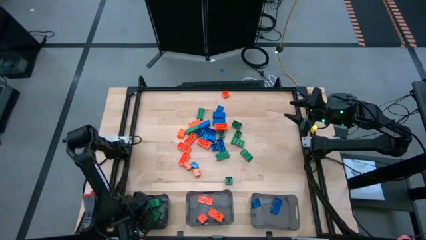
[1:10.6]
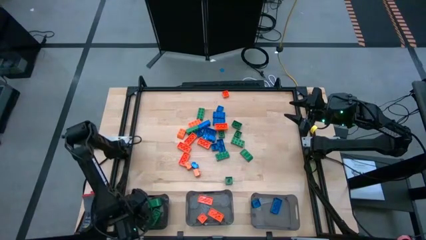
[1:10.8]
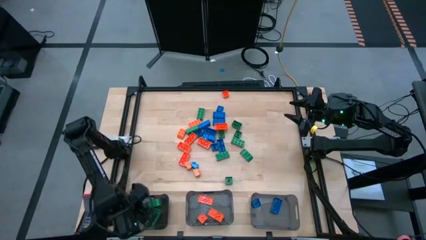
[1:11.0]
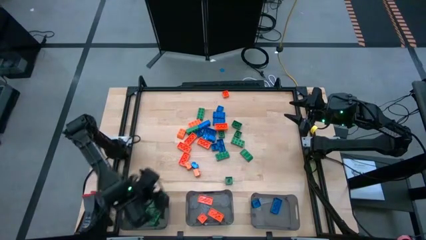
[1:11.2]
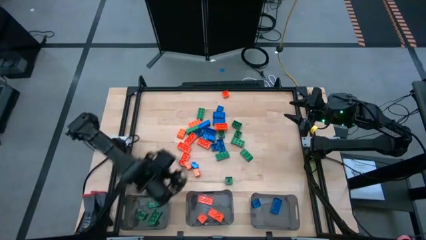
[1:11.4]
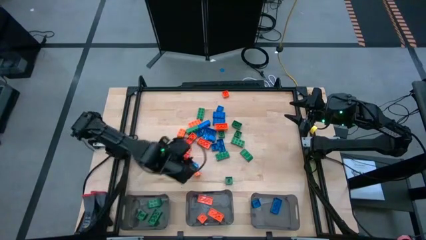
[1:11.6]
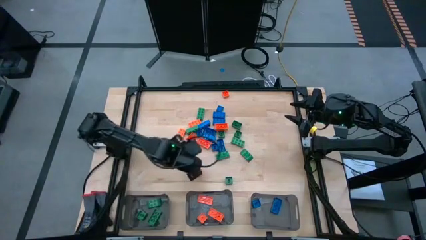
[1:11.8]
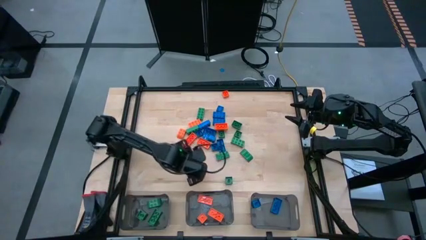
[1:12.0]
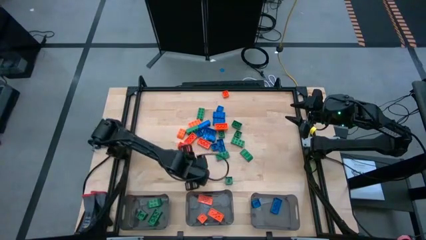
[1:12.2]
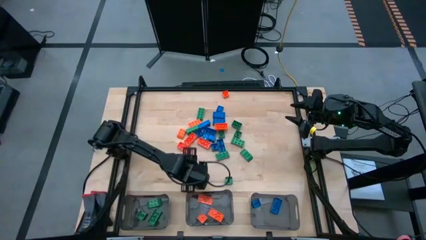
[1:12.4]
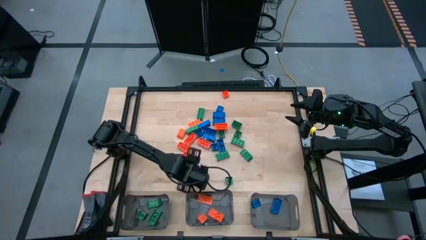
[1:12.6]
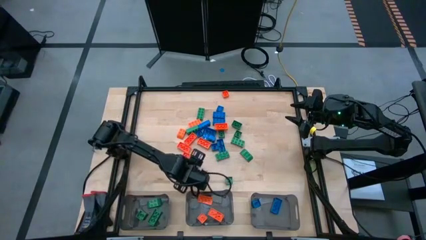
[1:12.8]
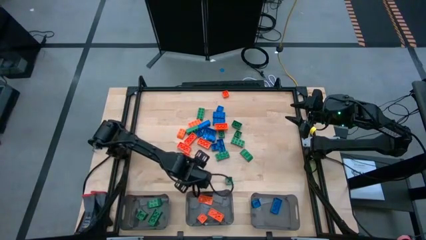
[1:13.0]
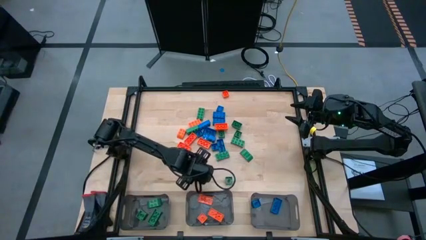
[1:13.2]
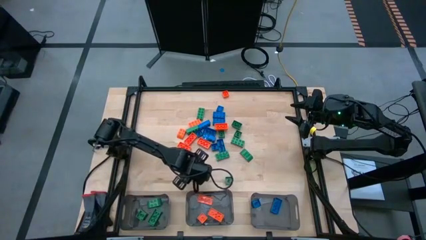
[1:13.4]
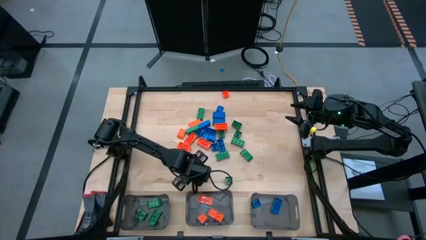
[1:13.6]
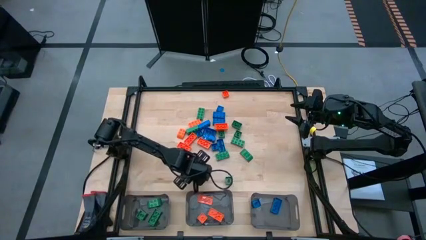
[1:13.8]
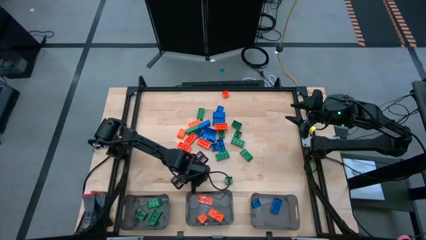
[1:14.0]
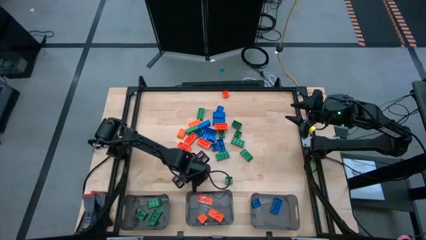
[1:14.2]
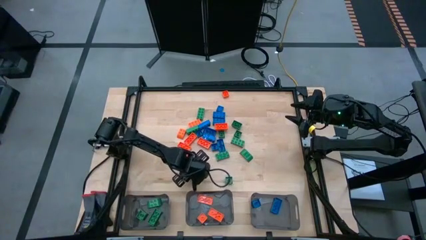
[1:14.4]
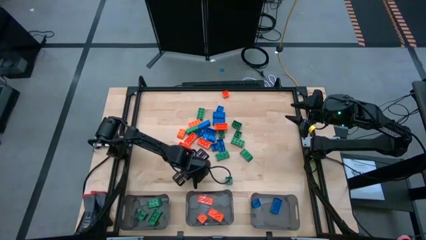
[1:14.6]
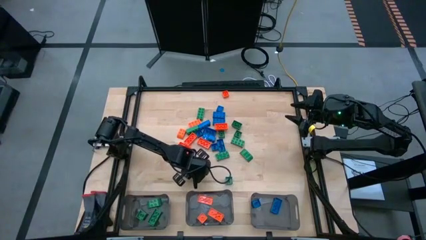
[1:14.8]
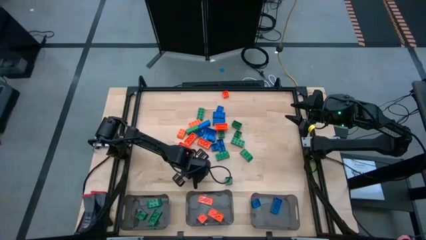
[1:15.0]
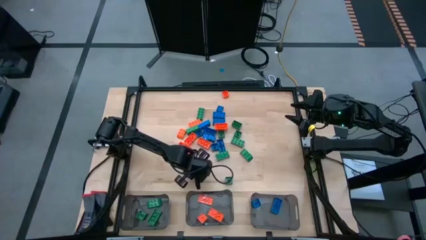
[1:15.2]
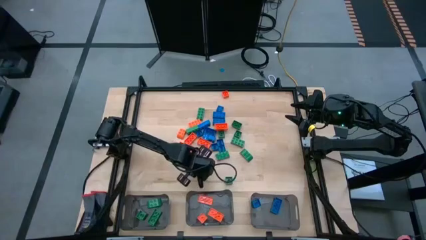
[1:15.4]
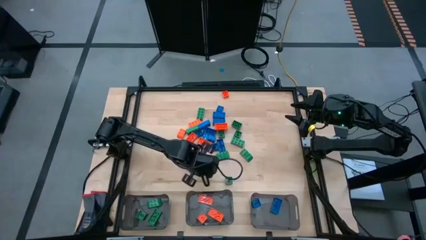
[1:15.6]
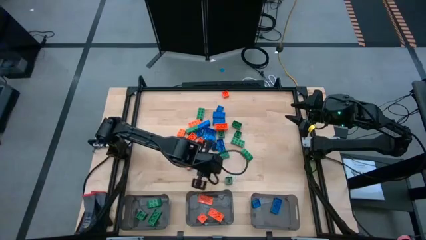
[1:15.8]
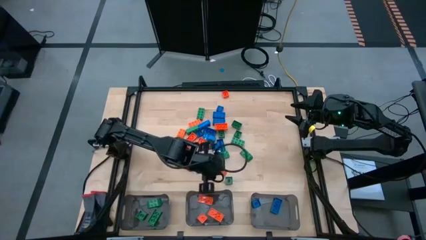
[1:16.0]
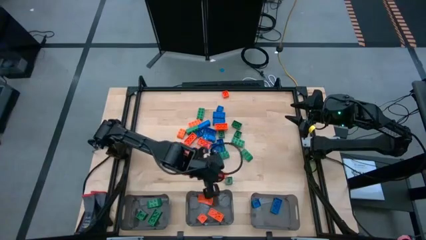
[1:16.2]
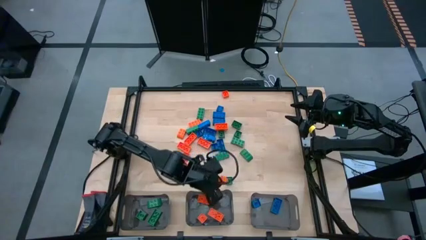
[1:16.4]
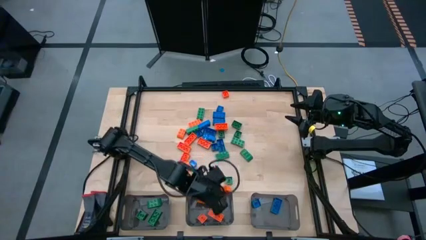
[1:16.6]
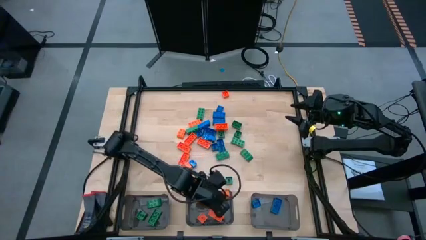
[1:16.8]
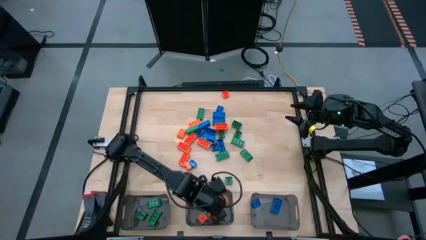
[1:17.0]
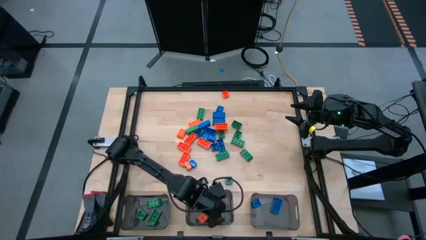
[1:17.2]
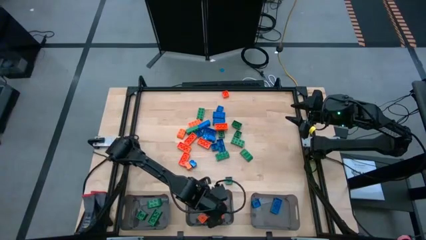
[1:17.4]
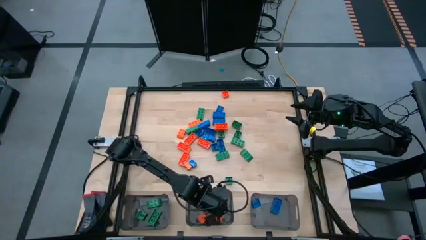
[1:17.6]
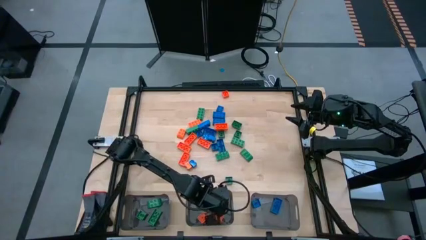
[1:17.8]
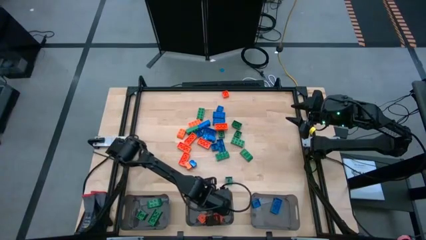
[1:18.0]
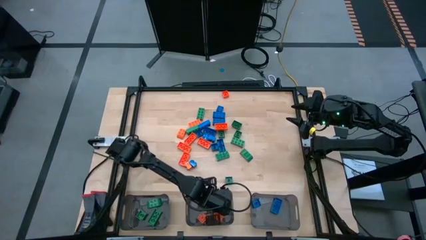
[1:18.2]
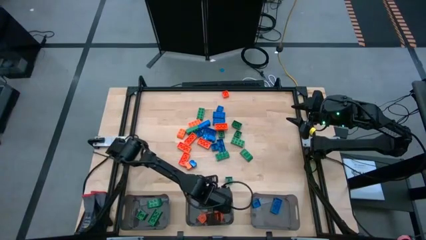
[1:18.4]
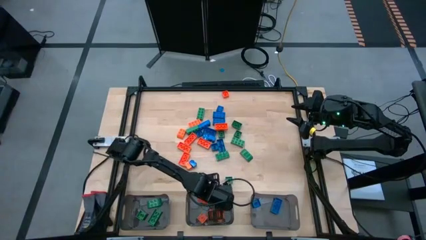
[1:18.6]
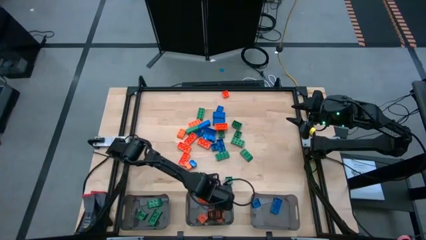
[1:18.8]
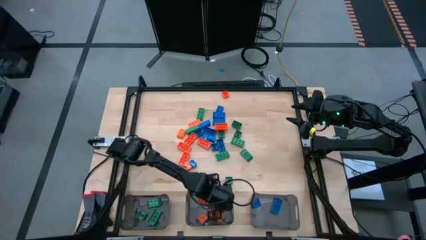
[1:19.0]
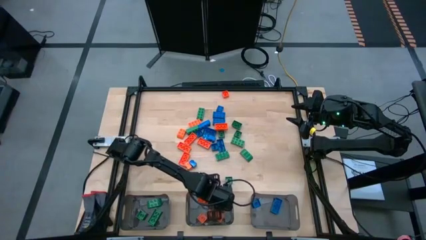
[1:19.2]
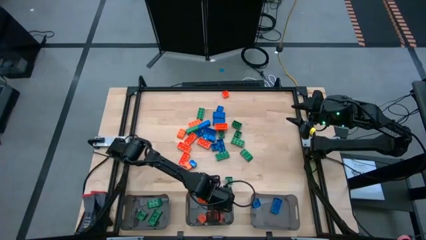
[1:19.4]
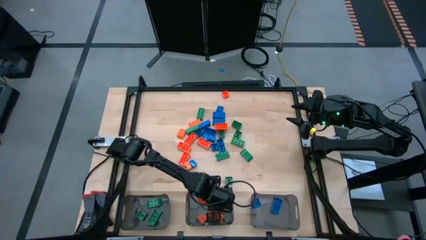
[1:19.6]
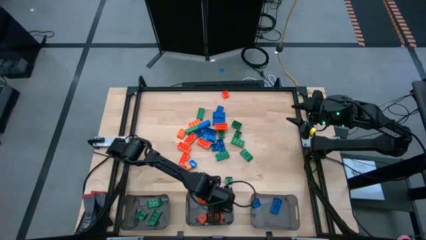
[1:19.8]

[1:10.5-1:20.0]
Task: Sort blocks
Put the orange game piece into the middle black bin

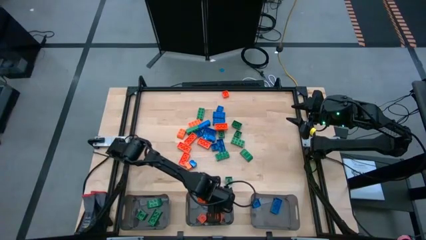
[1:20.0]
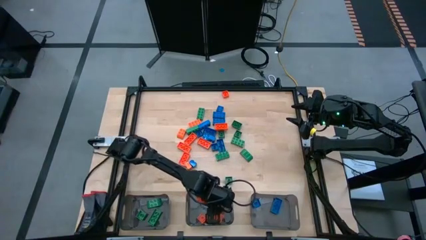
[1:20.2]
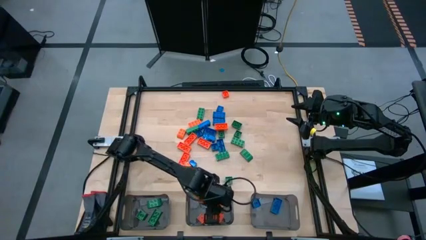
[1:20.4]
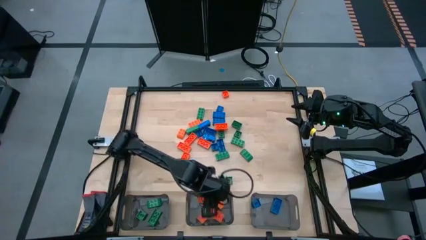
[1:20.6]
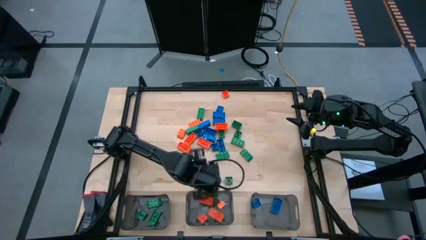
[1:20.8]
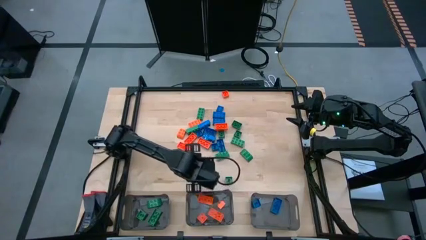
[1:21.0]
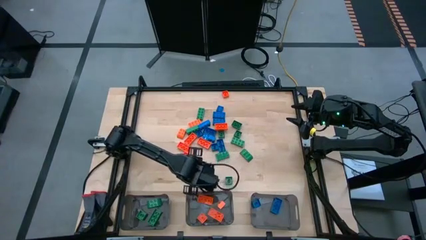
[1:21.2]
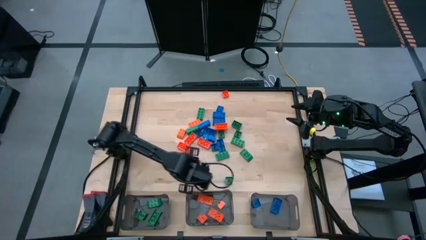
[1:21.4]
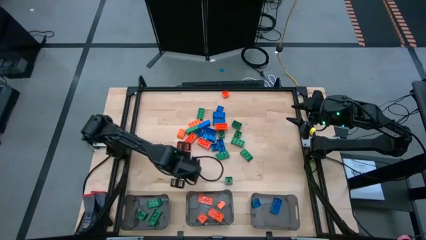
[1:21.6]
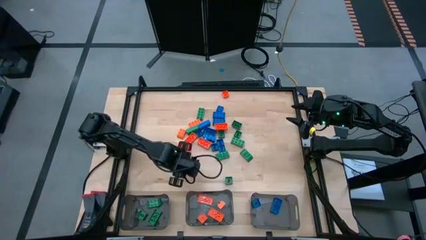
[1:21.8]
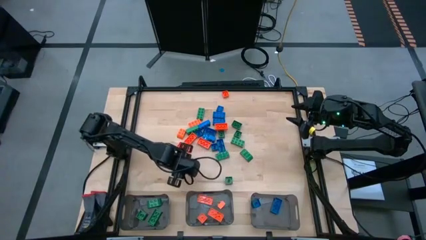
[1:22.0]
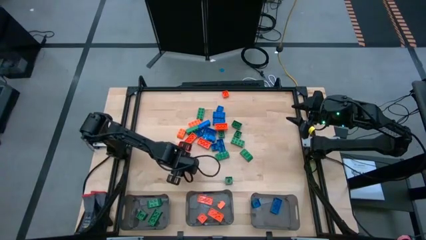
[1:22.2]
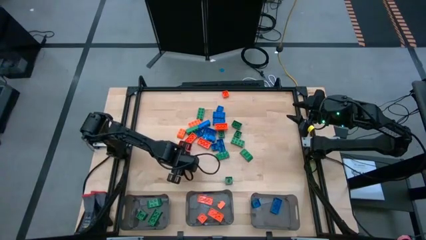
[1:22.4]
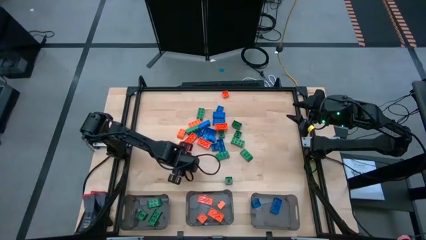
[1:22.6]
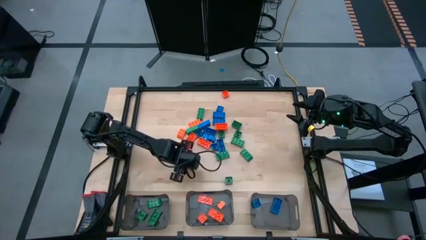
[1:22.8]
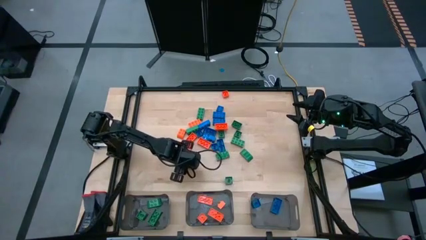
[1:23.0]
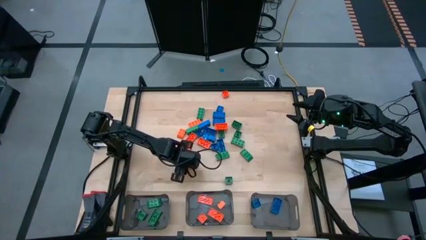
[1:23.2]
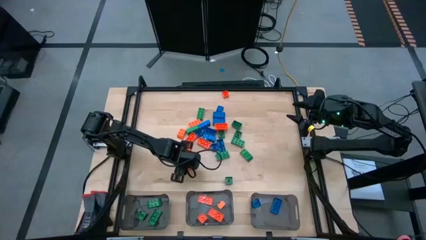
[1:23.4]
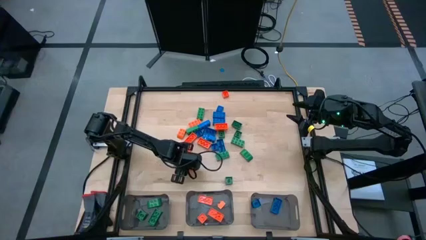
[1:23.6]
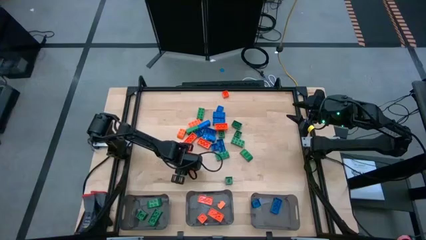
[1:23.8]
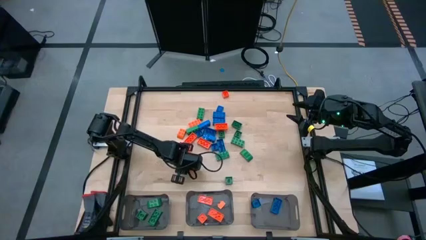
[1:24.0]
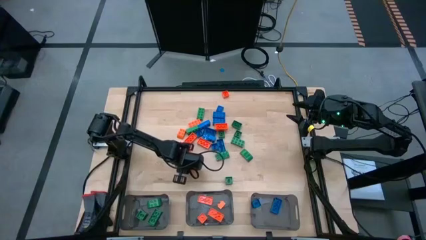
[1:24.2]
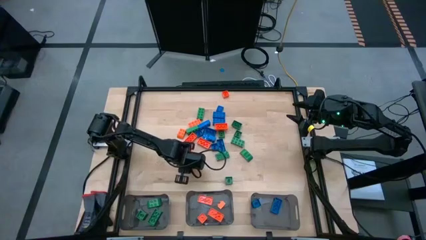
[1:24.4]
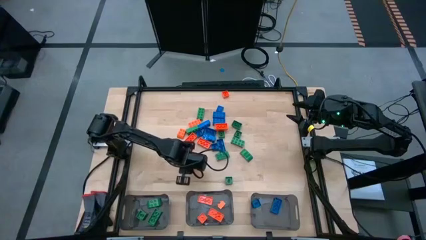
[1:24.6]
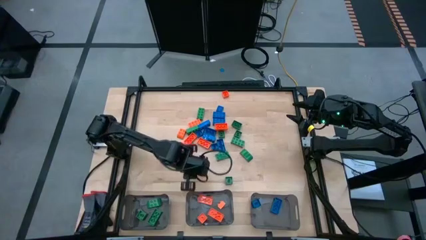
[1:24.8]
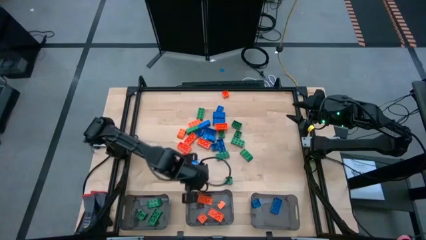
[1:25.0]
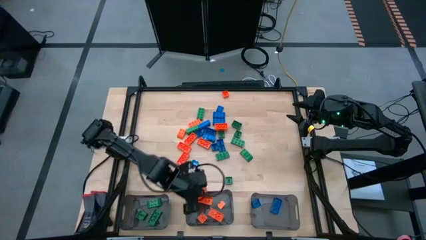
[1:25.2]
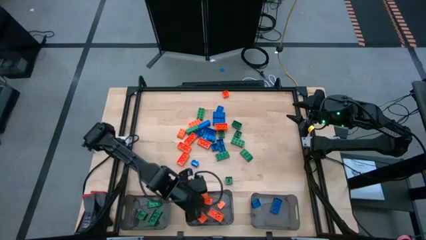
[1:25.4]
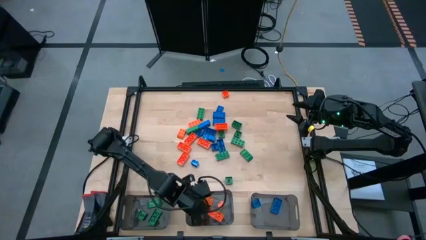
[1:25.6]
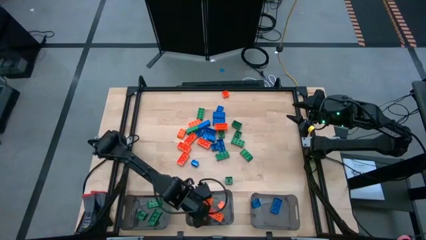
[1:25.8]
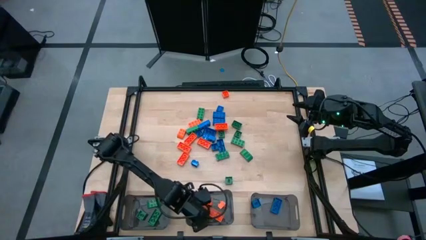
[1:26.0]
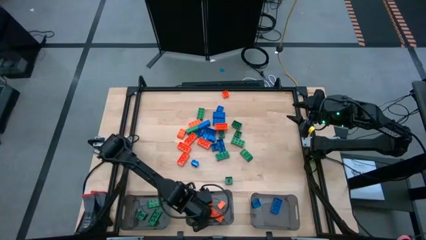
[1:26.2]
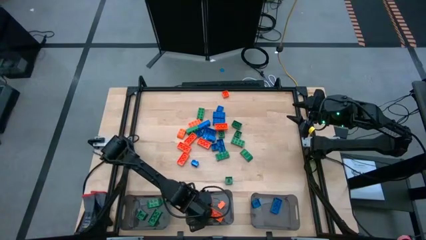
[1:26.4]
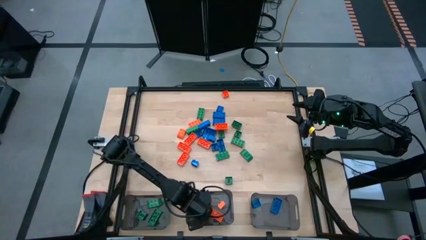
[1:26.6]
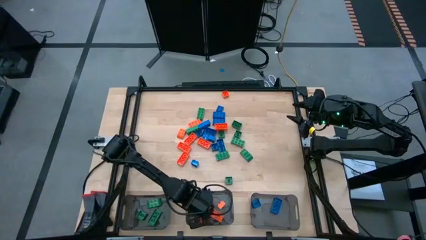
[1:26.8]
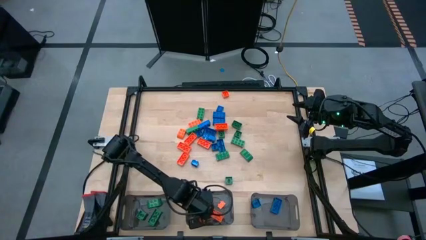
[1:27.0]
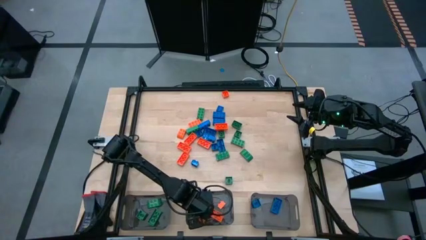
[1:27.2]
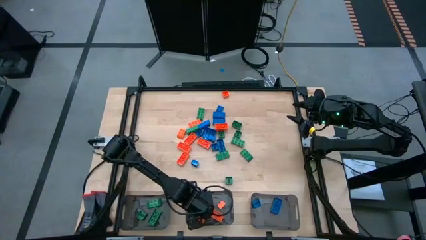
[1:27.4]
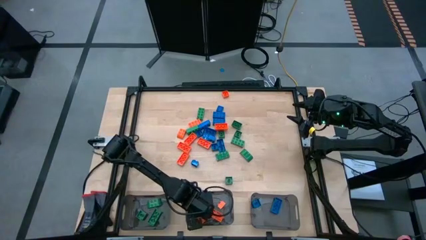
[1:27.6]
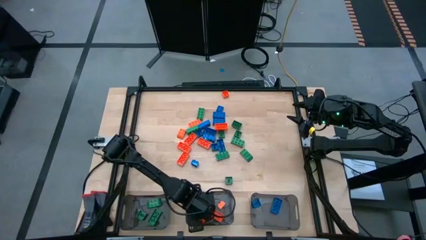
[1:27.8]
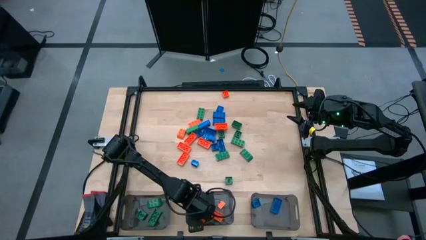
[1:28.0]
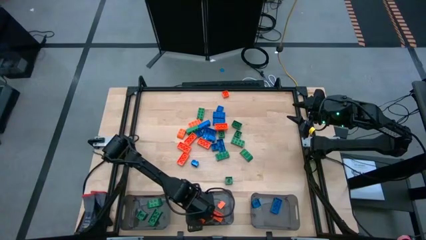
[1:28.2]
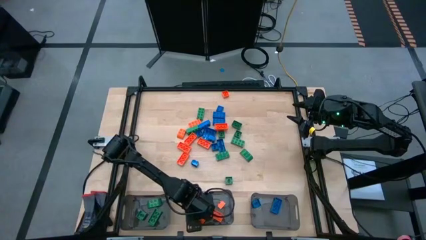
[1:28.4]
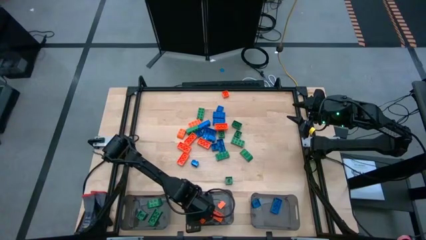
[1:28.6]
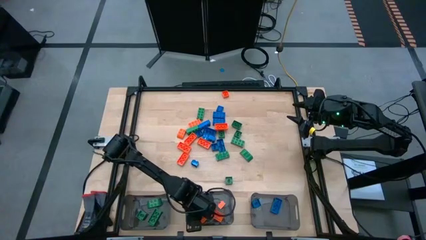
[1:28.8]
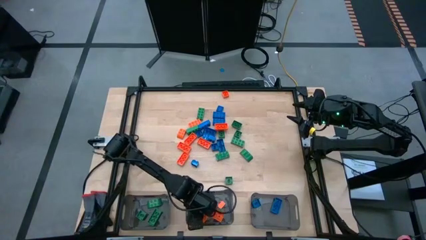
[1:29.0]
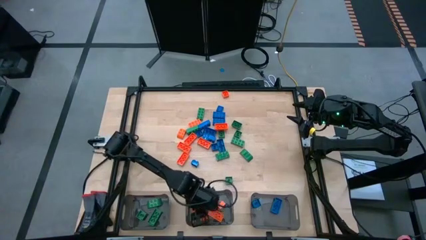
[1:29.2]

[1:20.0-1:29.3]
Put the orange game piece into the middle black bin
